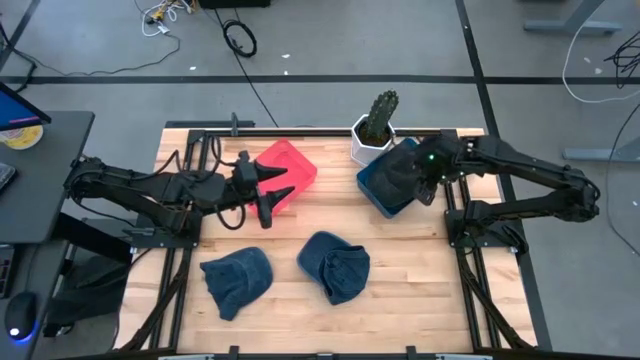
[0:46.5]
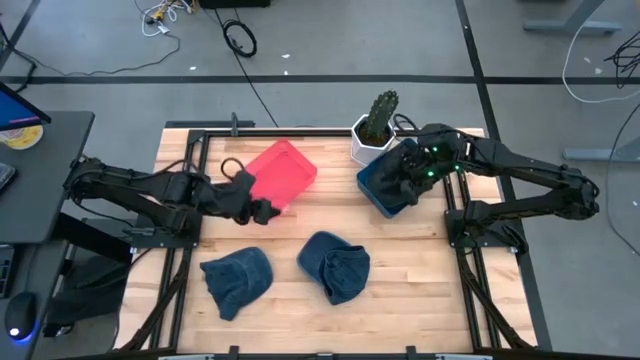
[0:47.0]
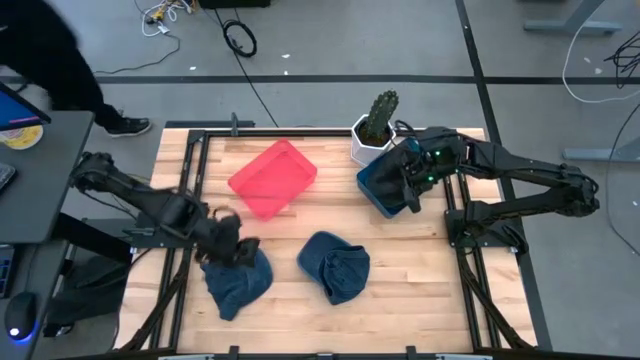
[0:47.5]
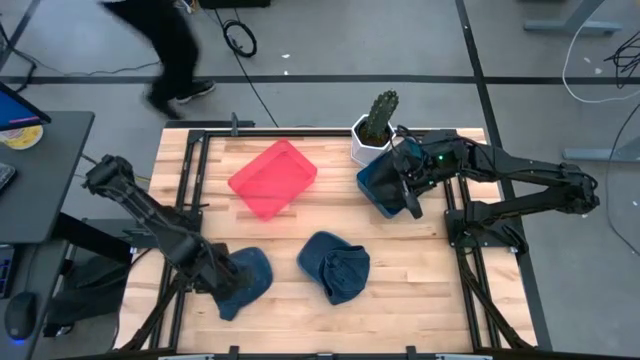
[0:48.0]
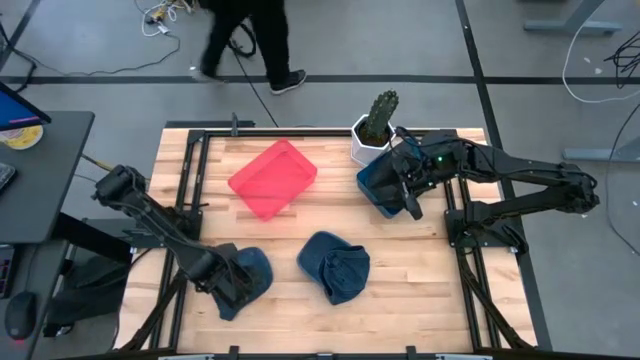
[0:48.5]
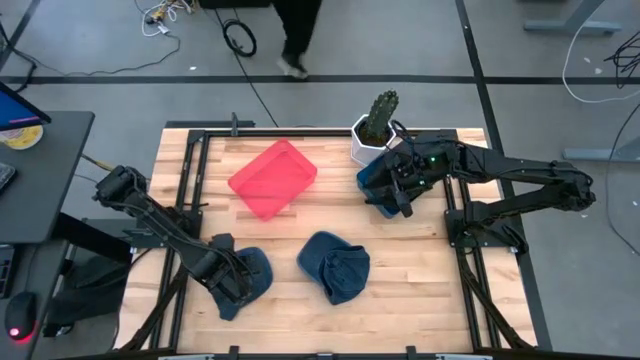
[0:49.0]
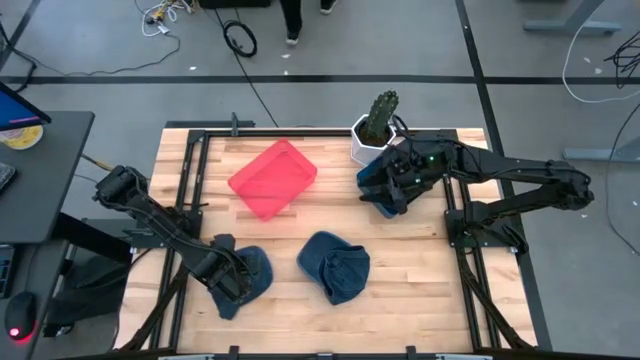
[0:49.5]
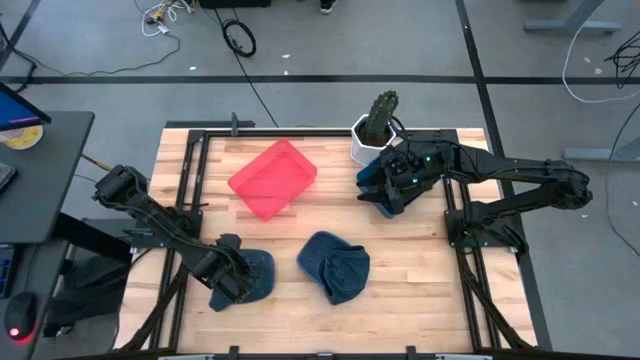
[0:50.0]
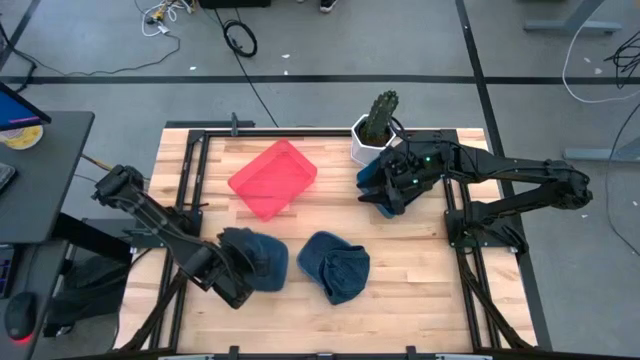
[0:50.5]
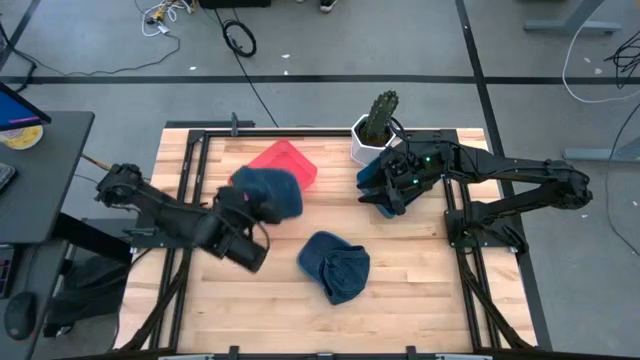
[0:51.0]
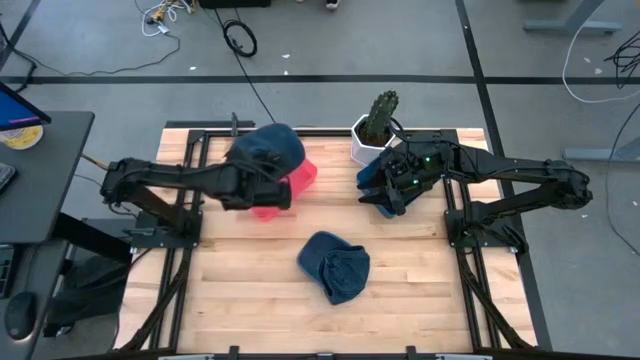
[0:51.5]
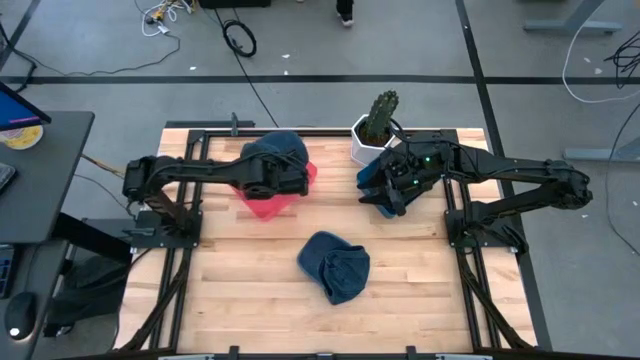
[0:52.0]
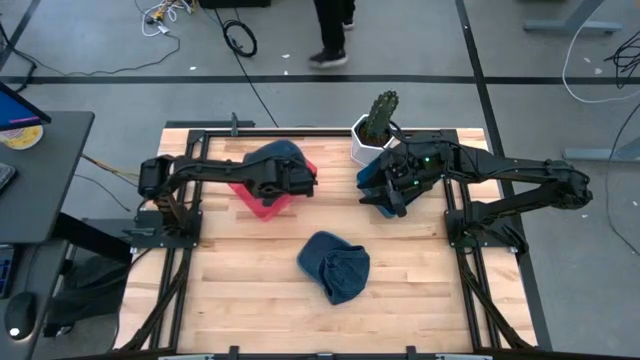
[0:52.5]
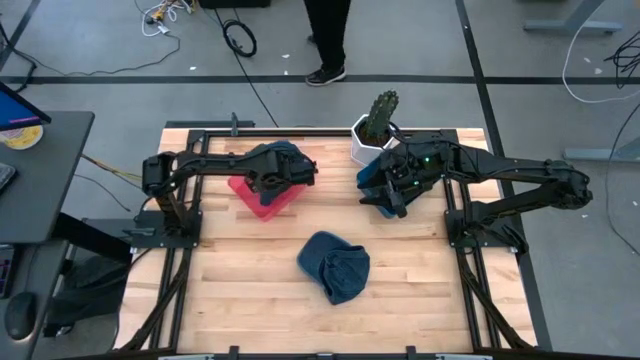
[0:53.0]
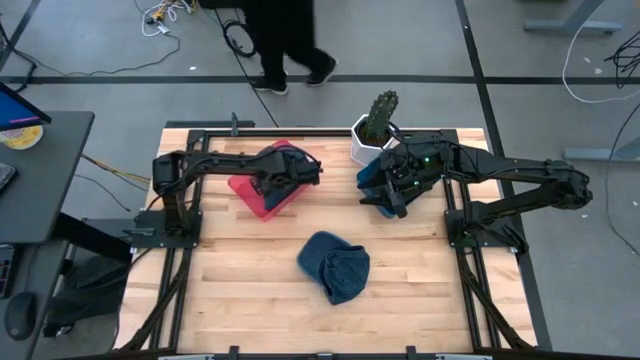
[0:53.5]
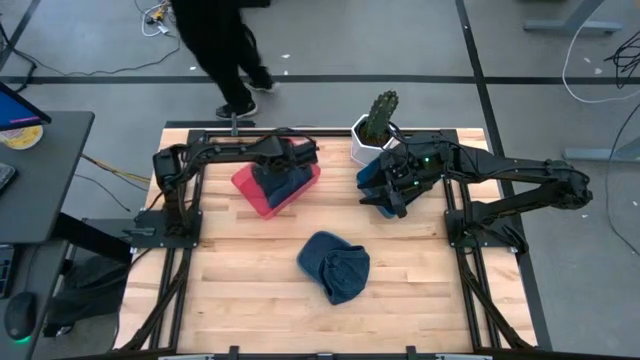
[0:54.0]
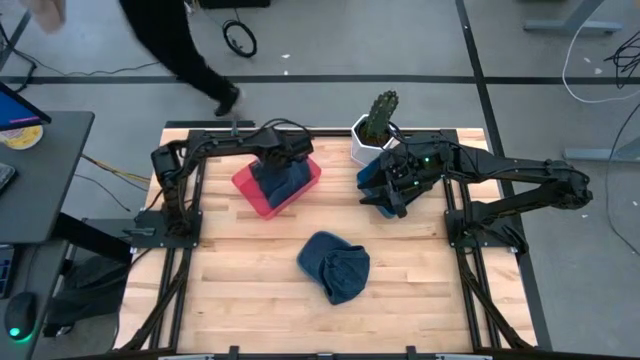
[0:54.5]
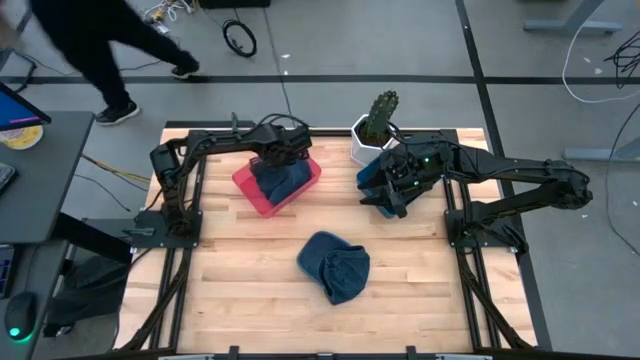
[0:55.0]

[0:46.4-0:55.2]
Task: Pick & Place hat
Put the left blue cap into the red bin

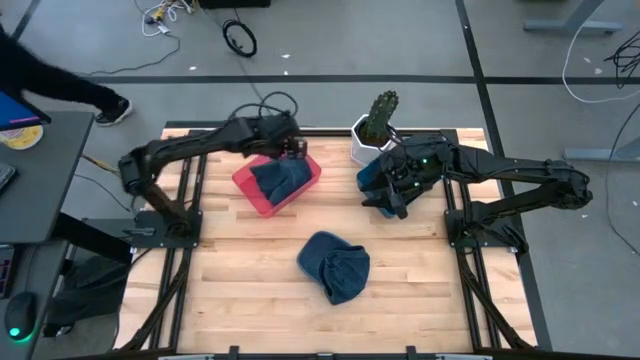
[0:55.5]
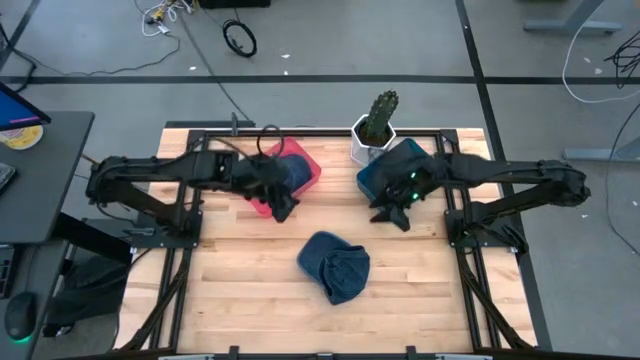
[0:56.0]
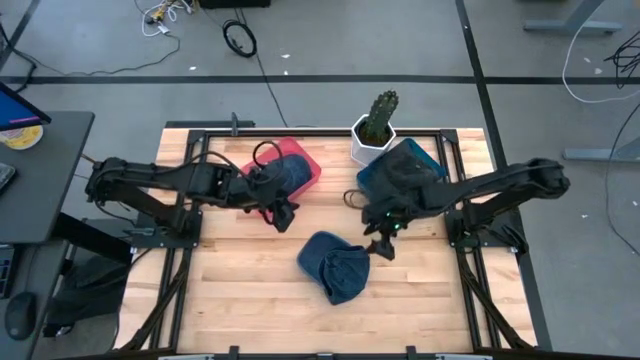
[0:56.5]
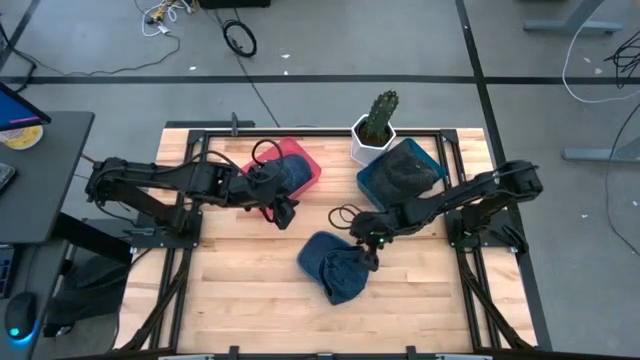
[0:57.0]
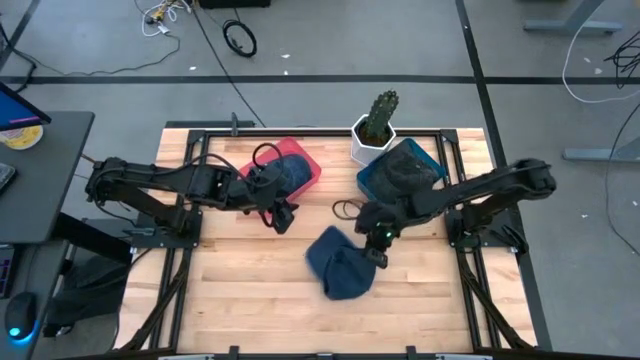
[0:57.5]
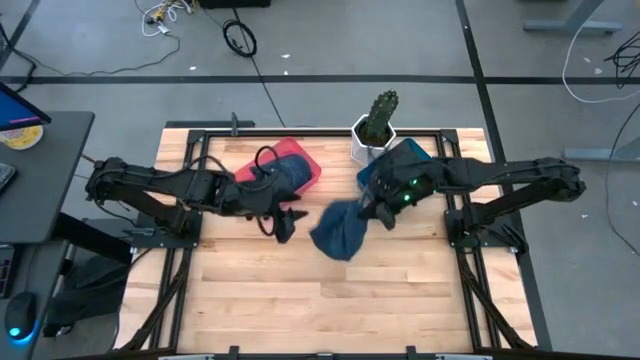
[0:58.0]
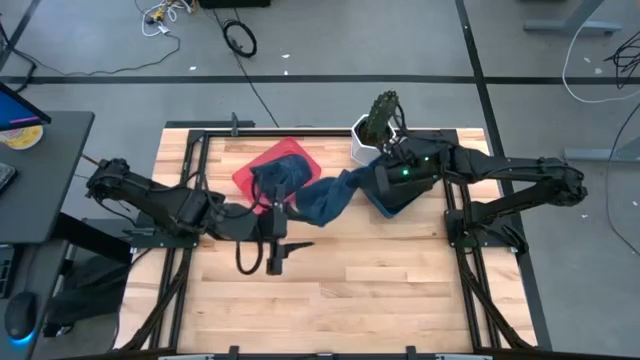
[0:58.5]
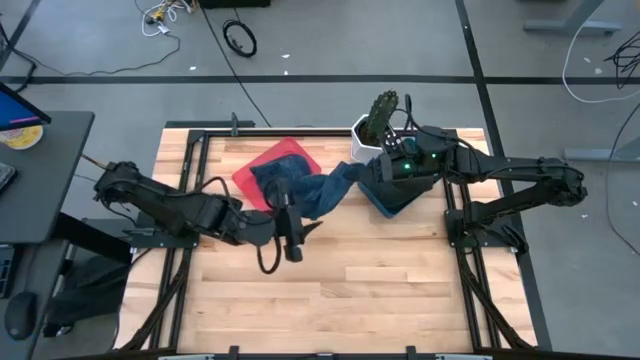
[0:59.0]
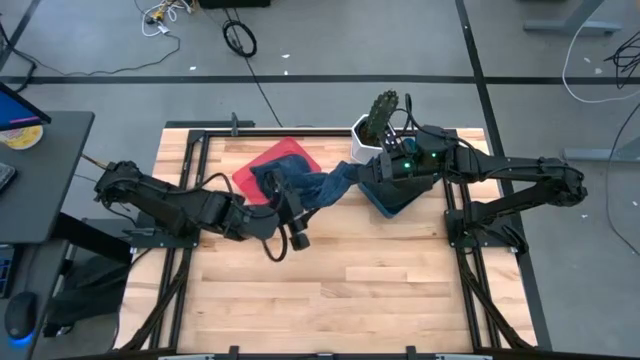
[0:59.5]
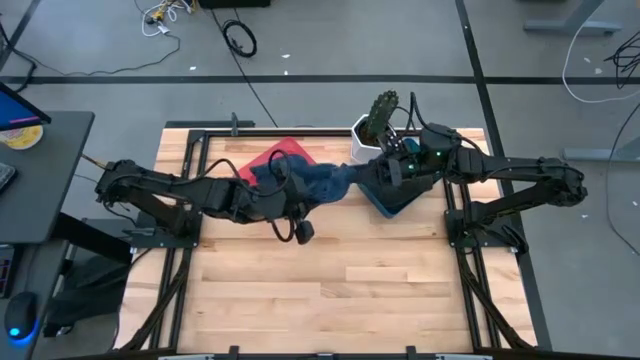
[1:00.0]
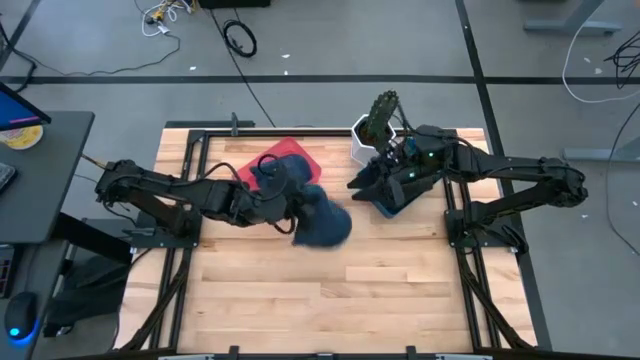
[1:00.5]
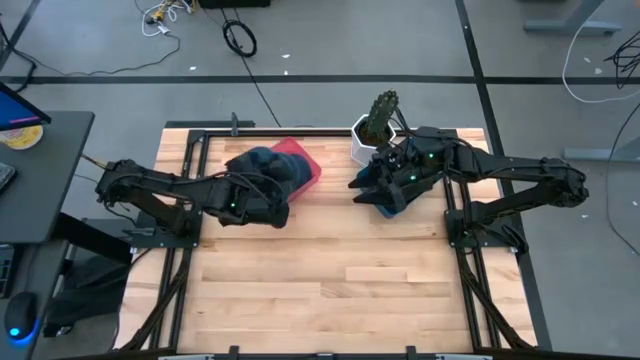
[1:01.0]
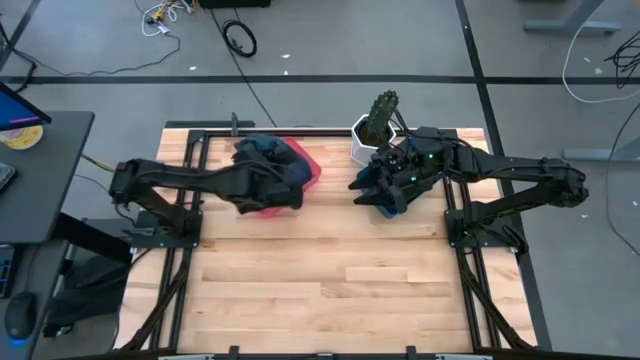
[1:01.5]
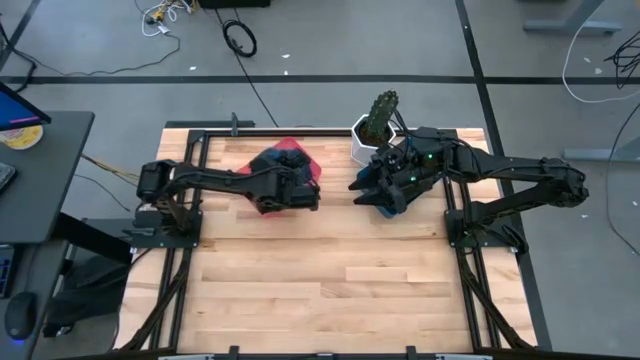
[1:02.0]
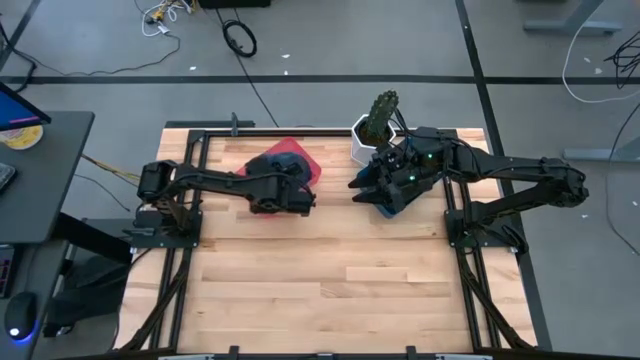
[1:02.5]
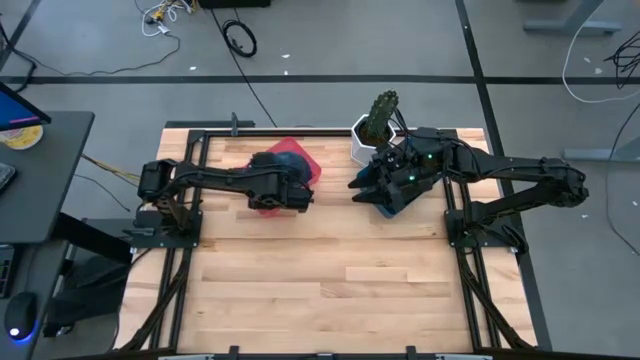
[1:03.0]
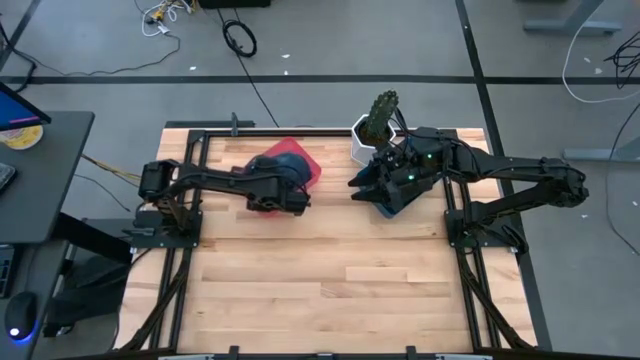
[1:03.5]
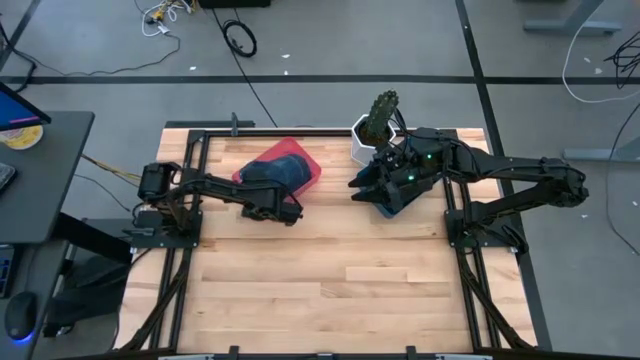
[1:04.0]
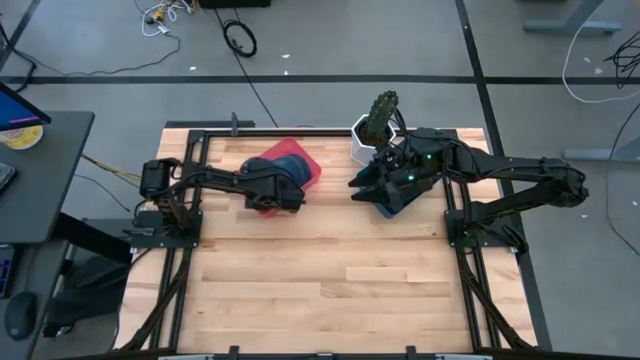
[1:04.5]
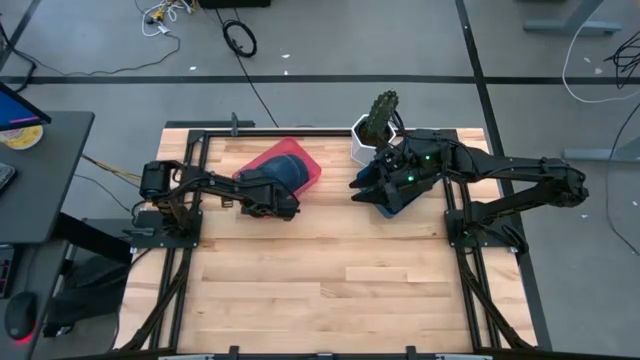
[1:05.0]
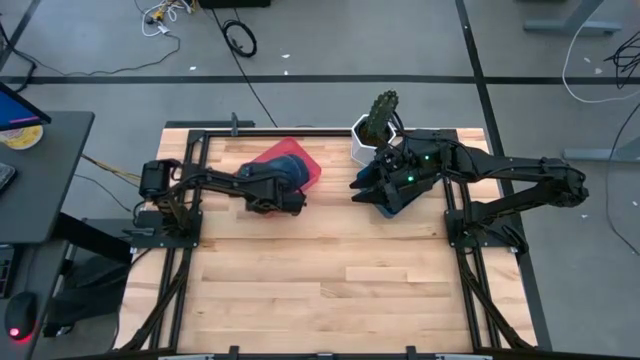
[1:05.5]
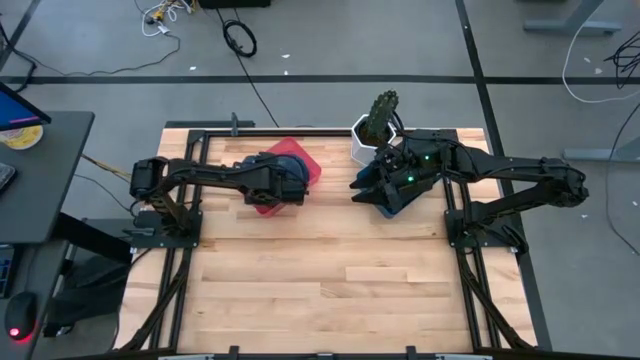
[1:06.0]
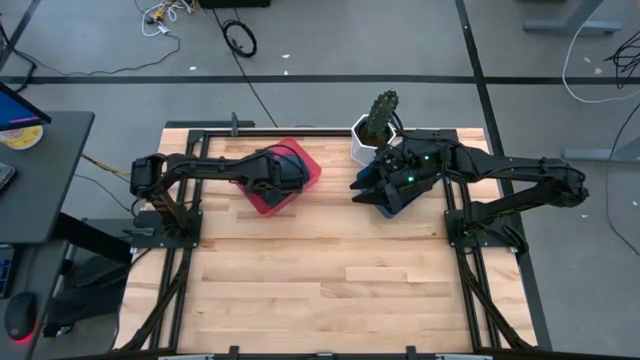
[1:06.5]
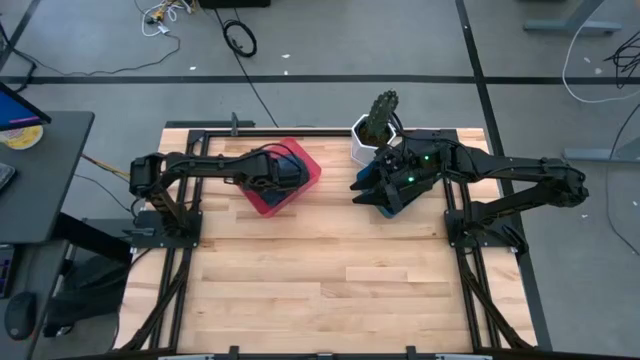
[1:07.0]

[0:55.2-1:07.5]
Put the blue cap into the red bin

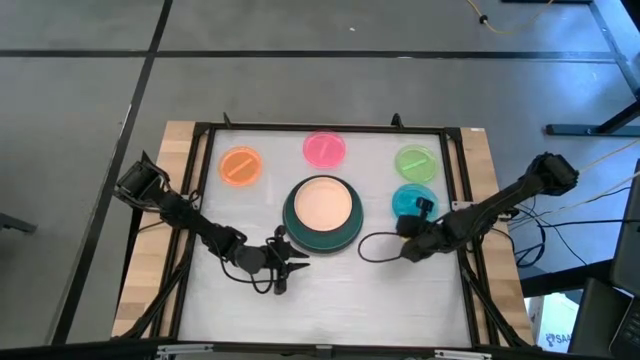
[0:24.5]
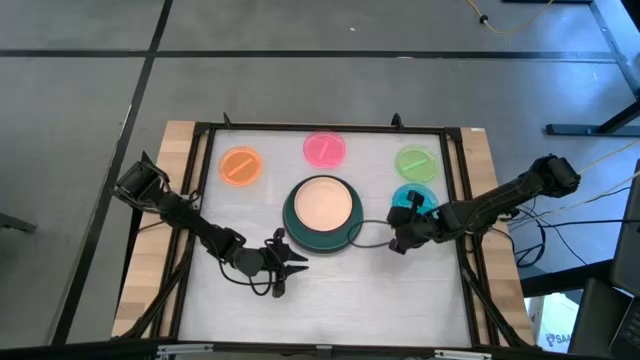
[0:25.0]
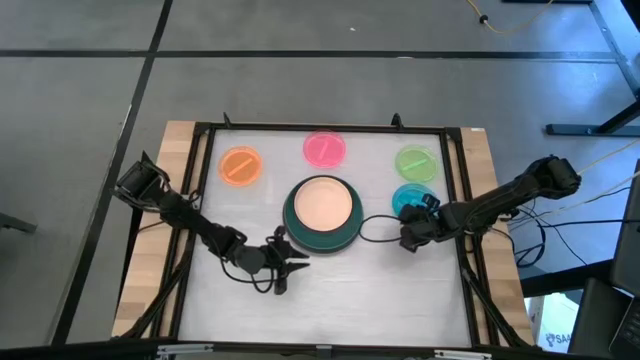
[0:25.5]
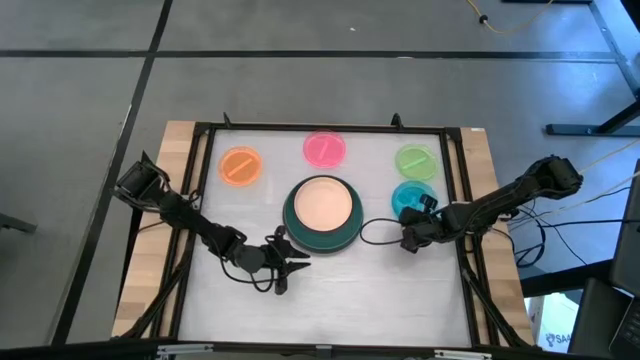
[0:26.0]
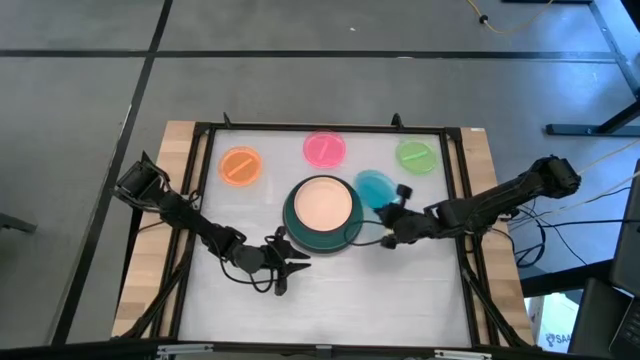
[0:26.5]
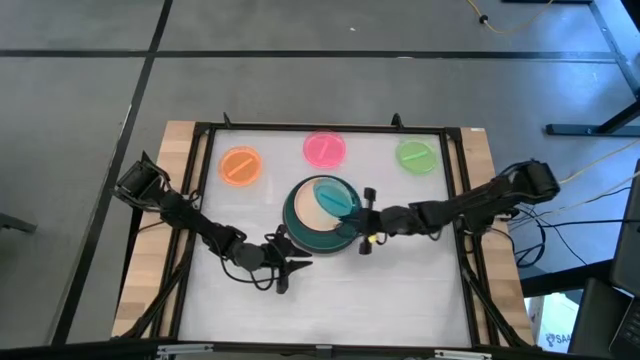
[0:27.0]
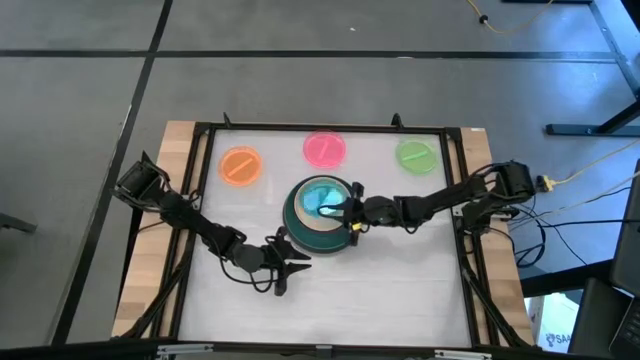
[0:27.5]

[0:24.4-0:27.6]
Task: Stack plastic plates
Stack the small blue plate on top of the small light orange plate
